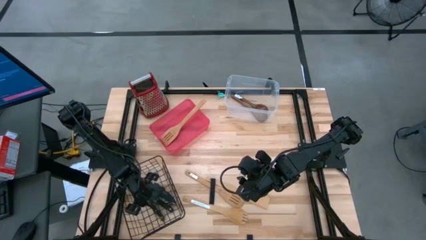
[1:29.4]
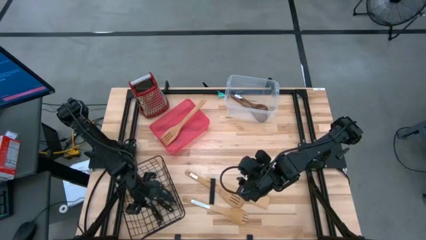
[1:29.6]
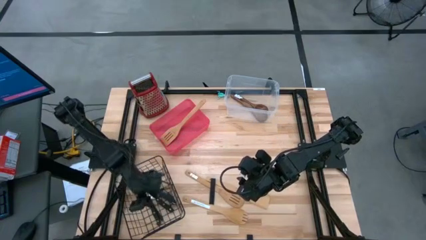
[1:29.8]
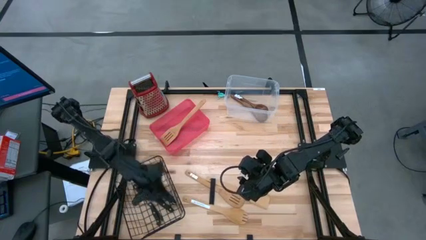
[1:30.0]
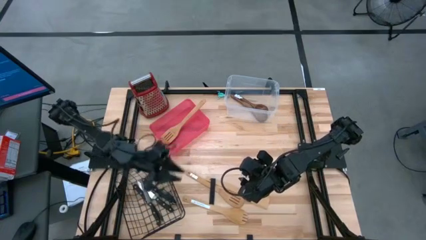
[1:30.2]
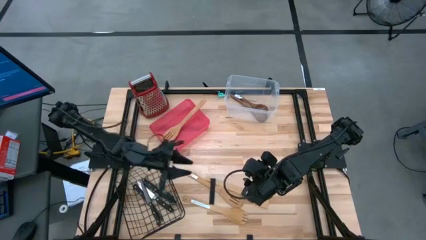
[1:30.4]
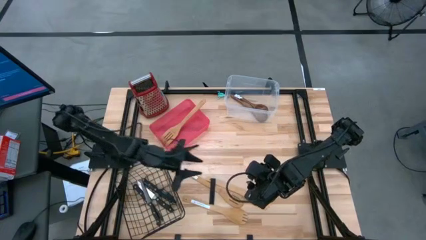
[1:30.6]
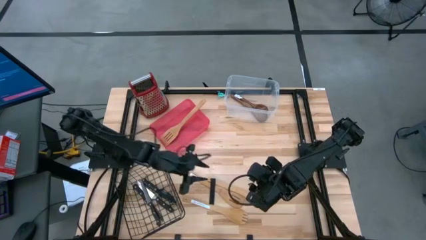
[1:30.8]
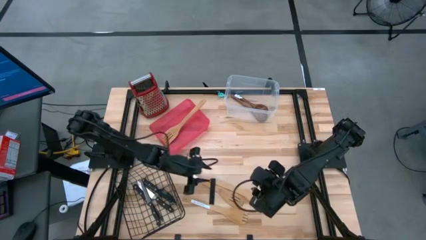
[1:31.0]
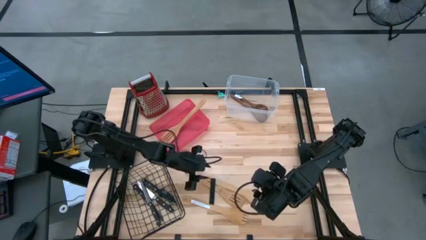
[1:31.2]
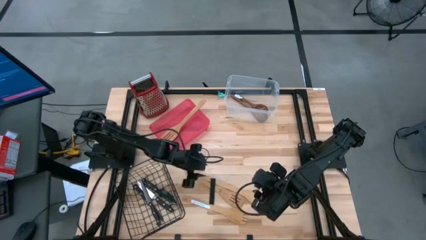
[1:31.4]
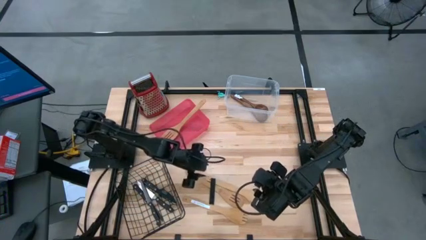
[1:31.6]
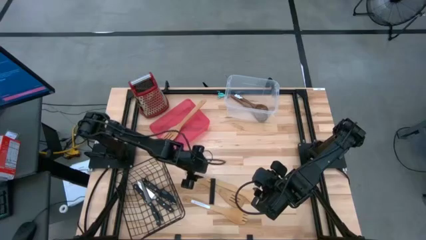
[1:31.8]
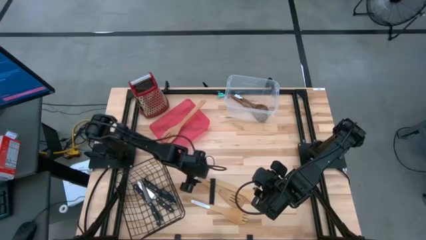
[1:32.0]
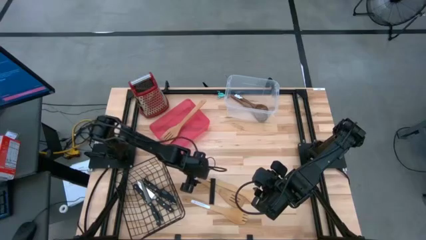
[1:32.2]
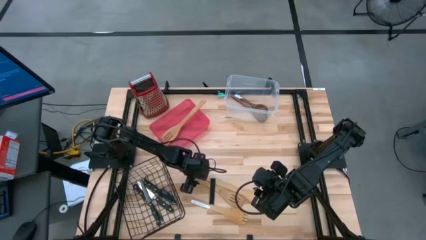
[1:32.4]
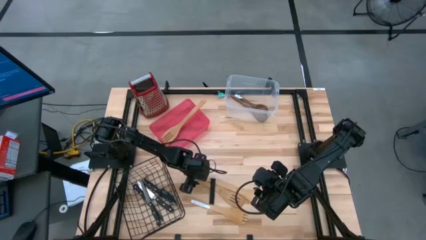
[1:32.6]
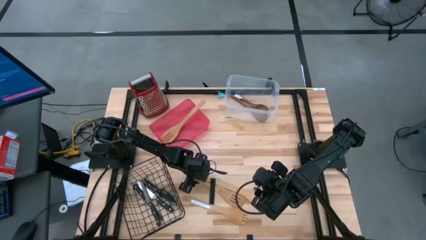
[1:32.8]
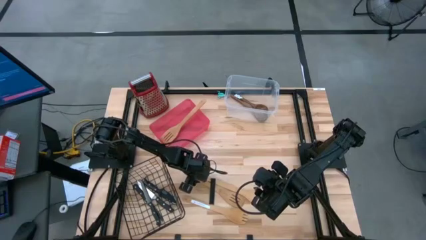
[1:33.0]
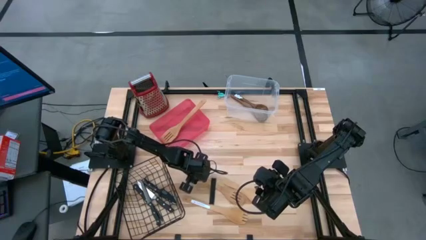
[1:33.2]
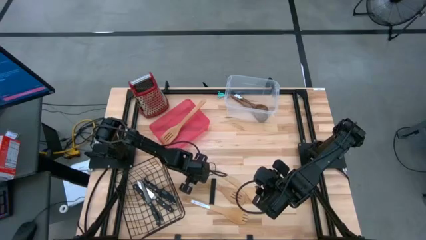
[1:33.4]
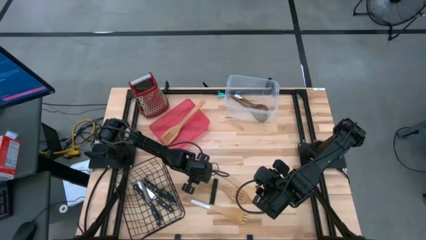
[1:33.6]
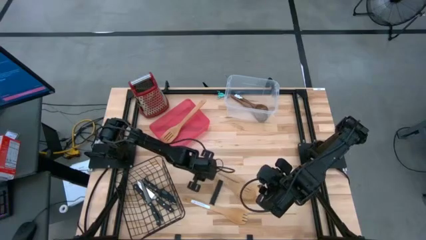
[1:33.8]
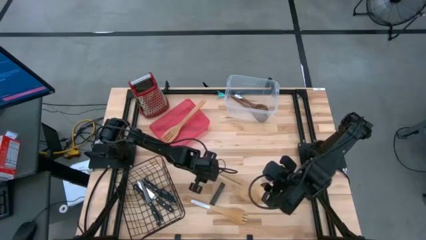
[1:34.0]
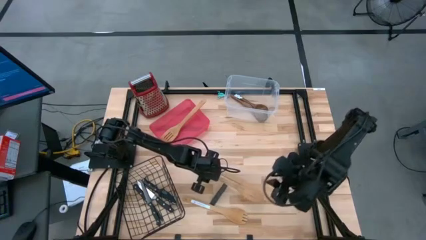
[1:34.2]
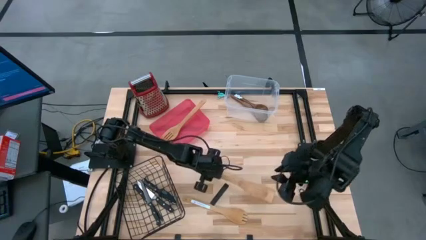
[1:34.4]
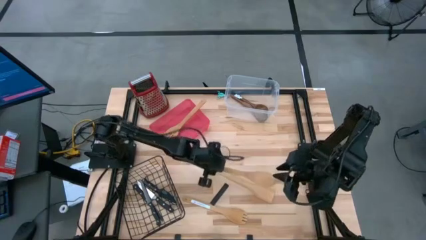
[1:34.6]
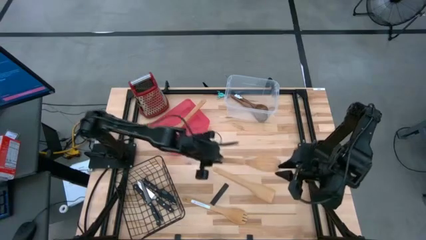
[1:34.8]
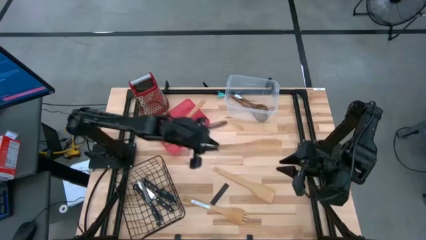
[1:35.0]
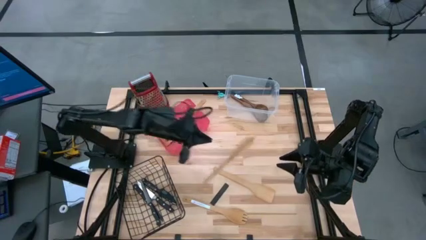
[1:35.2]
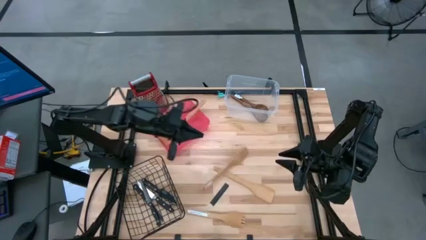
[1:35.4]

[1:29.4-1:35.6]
Task: Pick & Place Kitchen Items
Put the wooden slotted serving spoon into the transparent bin

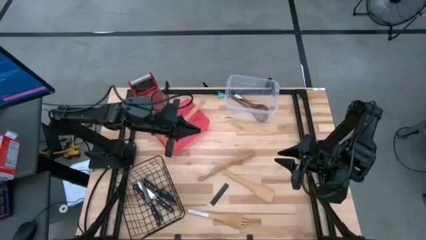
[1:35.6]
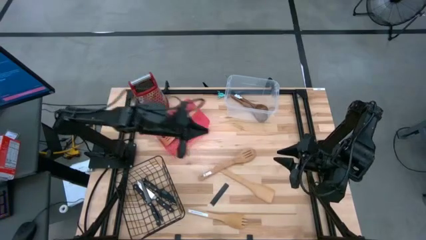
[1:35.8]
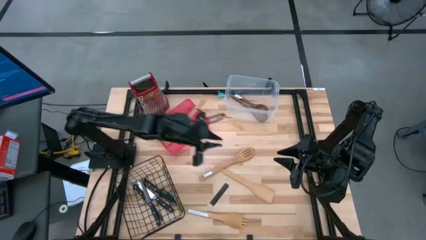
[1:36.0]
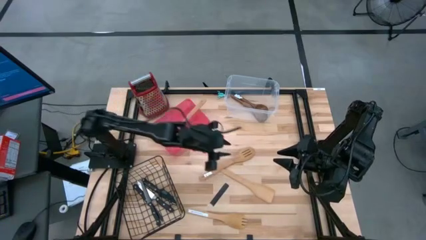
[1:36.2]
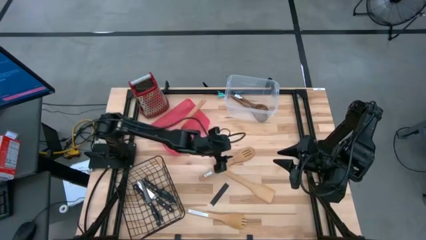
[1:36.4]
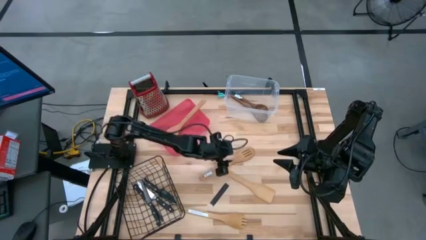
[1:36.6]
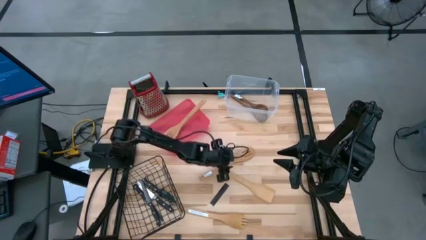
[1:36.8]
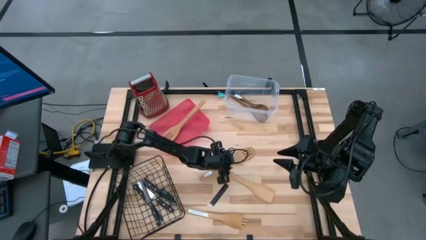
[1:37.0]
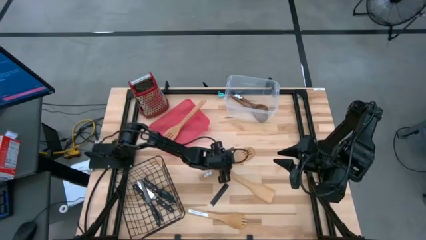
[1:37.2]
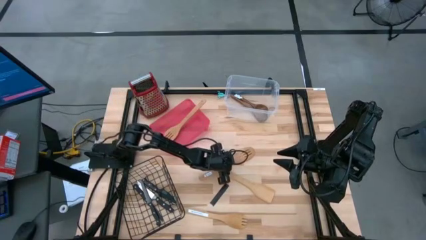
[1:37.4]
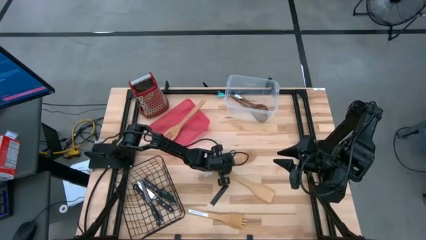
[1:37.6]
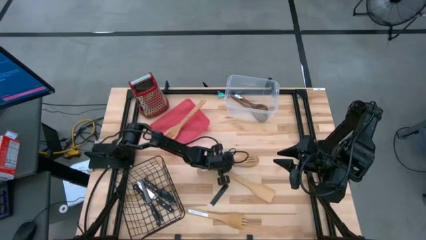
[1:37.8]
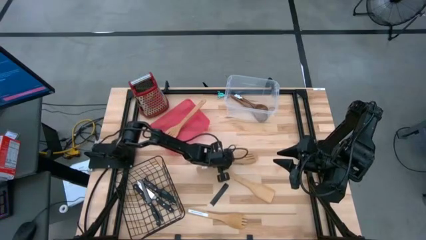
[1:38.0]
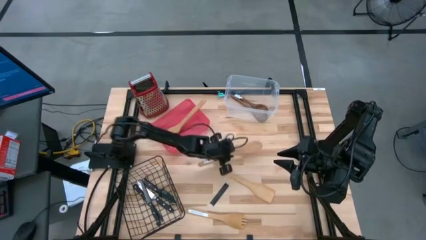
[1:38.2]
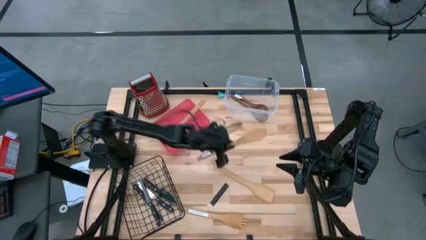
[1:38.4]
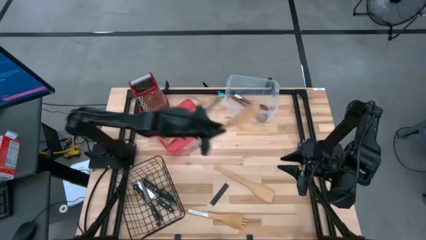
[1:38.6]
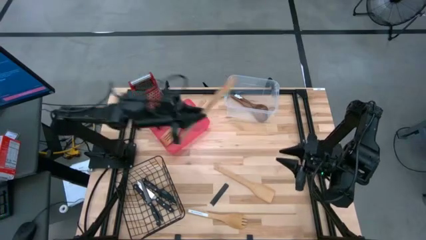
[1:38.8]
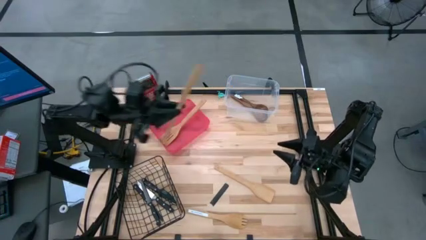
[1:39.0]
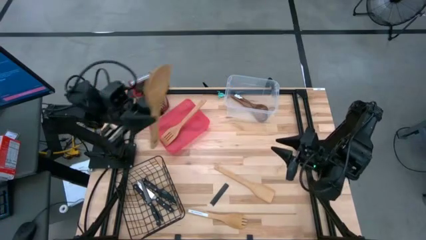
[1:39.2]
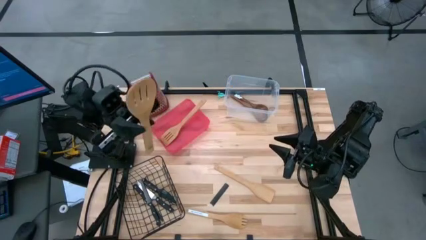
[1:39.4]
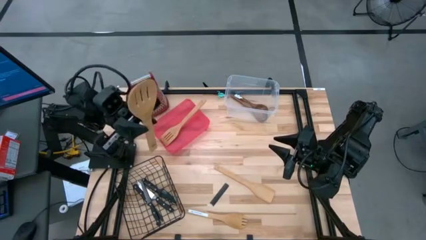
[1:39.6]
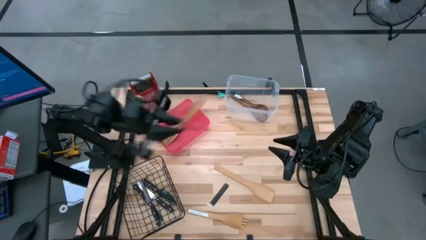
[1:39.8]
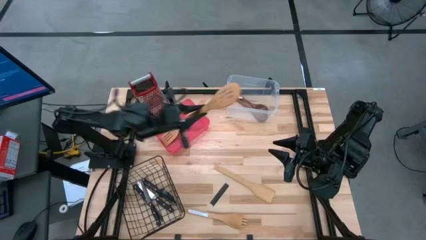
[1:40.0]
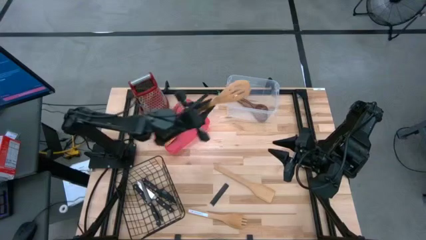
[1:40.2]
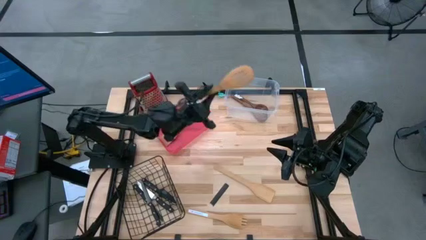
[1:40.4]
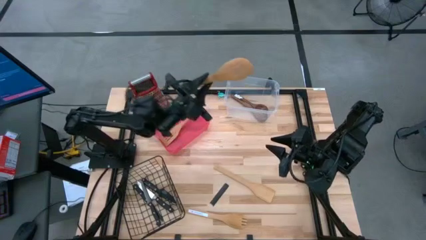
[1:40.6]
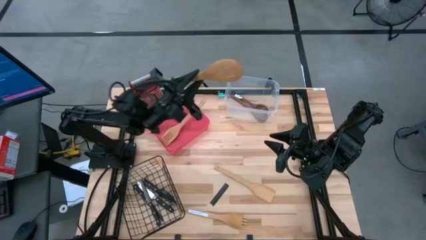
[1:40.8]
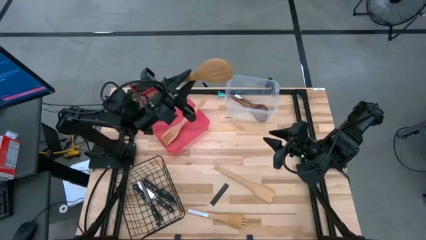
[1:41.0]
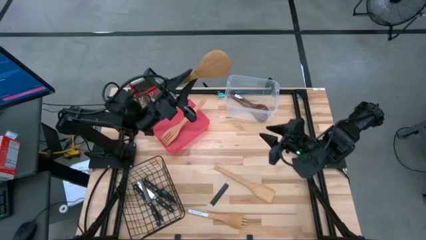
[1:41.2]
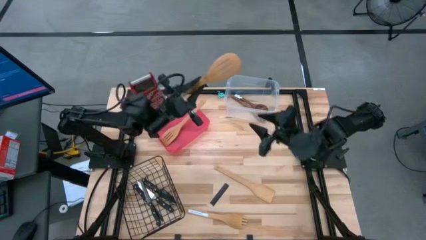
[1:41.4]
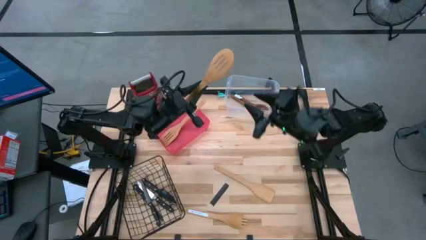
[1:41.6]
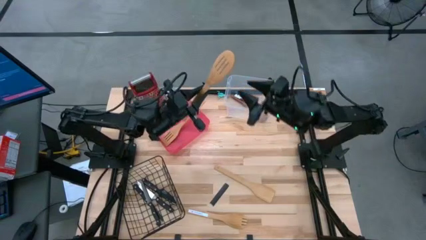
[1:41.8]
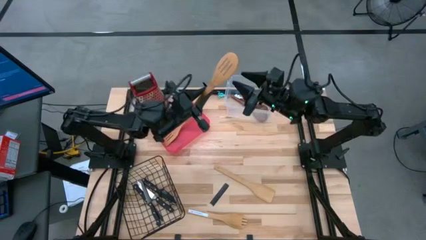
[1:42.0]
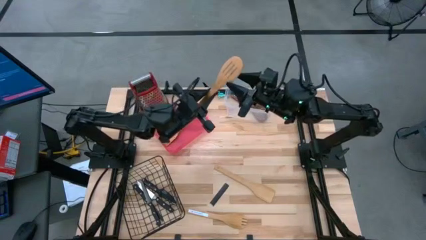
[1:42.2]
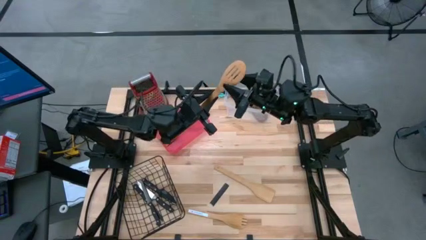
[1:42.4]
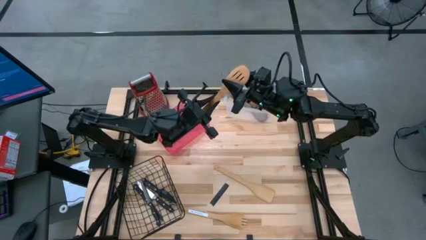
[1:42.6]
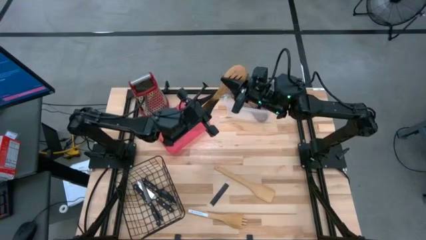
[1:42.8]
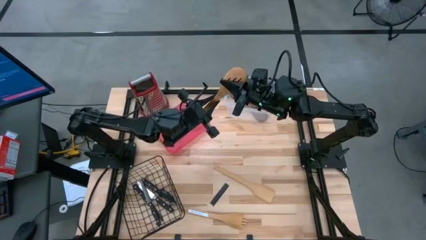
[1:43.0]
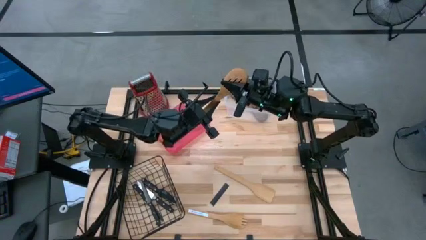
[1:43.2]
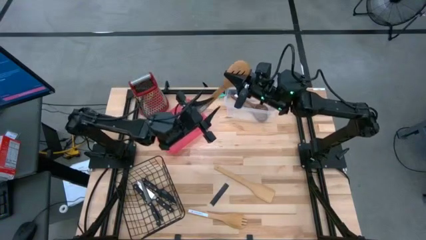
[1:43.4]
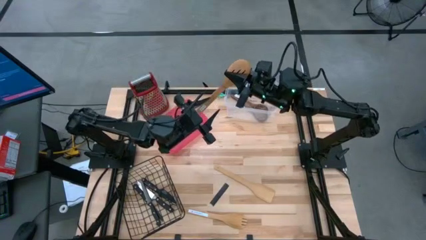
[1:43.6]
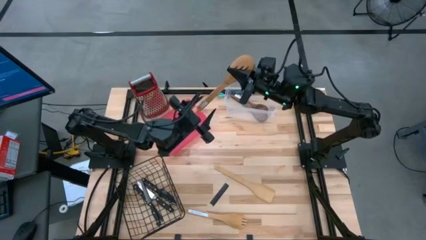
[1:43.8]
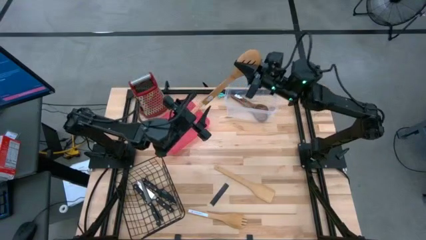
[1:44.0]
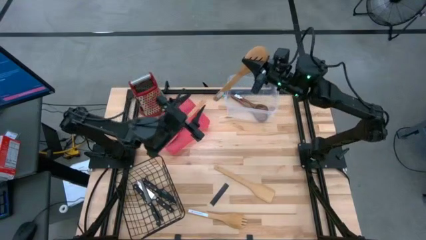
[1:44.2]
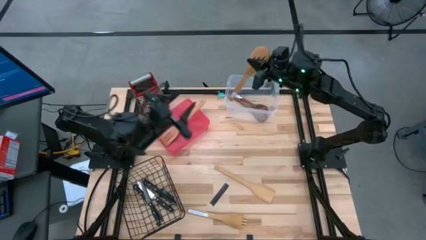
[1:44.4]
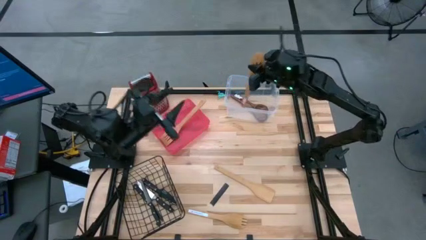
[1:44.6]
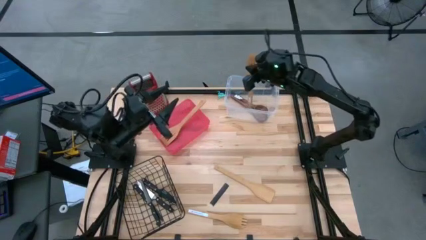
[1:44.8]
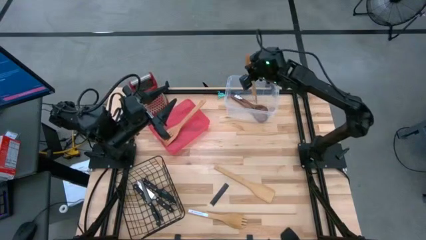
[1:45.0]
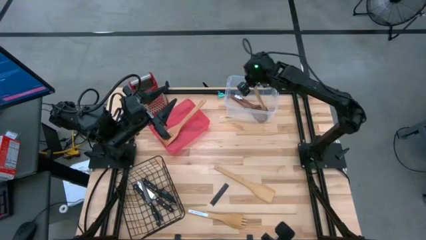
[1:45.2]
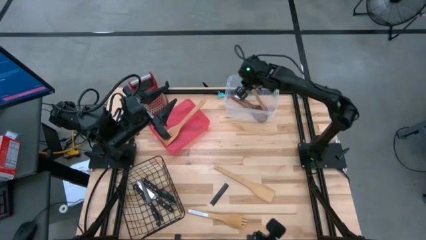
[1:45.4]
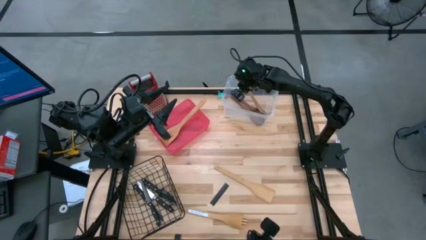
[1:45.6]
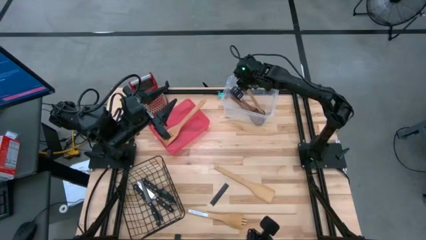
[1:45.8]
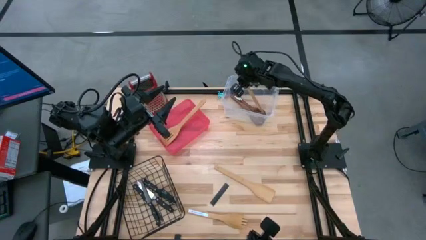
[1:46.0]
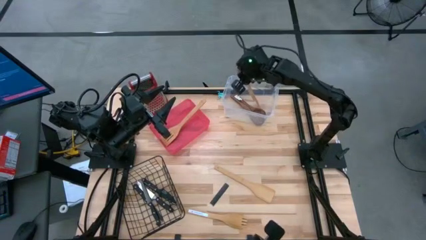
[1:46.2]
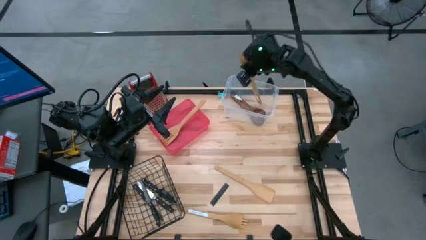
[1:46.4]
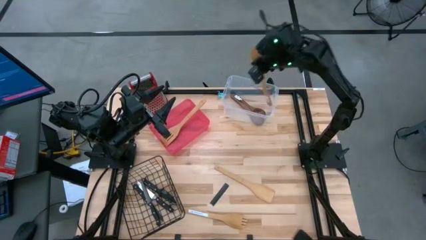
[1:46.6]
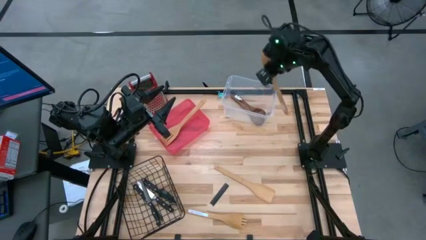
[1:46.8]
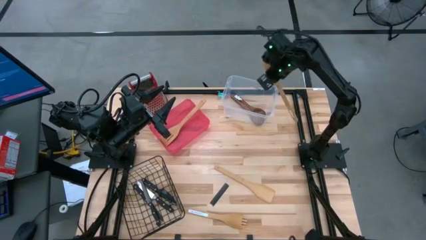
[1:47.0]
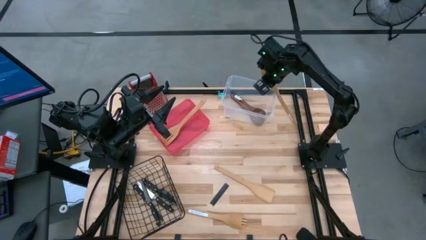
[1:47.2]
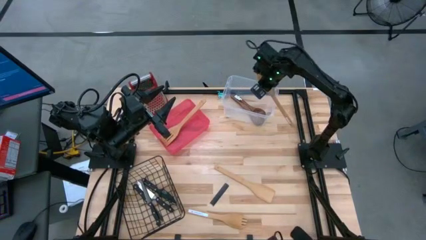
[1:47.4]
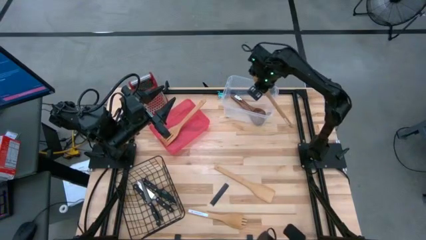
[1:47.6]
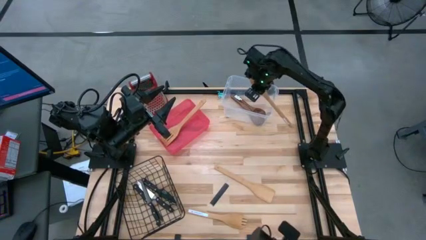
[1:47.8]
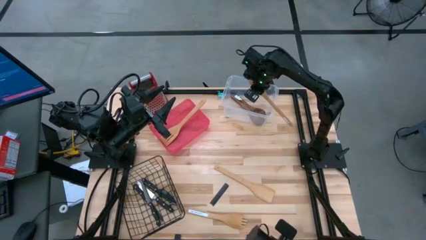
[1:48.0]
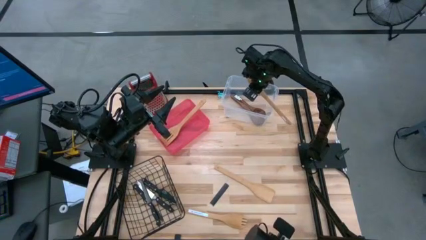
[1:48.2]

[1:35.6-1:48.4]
Put the wooden serving spoon into the transparent bin
